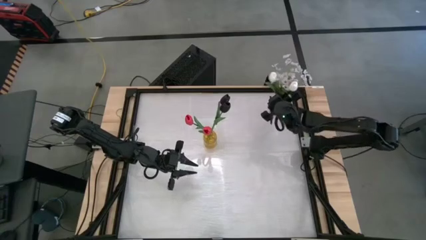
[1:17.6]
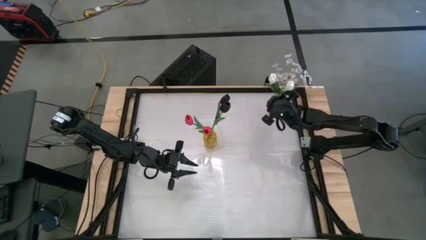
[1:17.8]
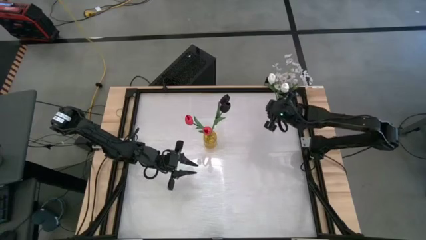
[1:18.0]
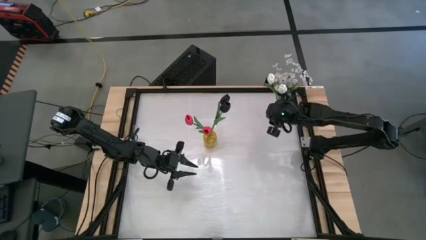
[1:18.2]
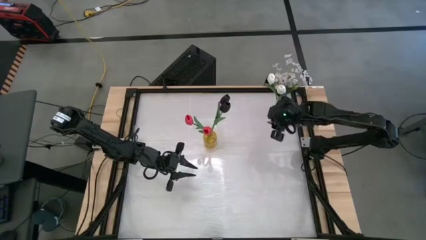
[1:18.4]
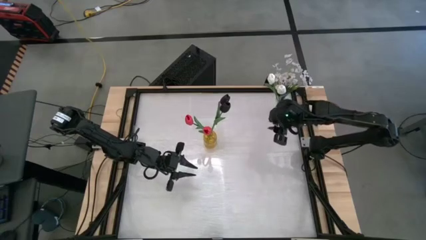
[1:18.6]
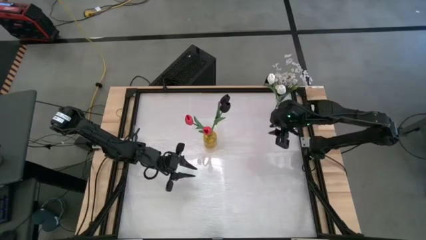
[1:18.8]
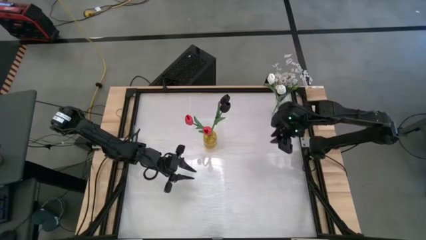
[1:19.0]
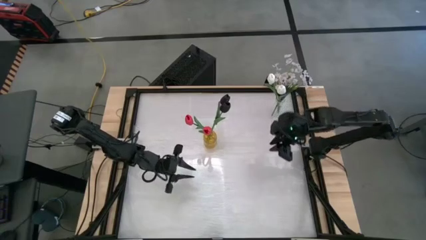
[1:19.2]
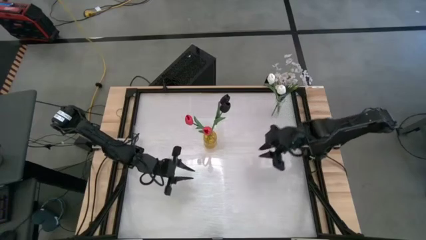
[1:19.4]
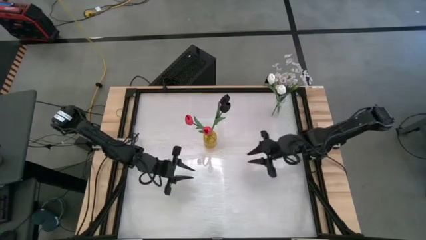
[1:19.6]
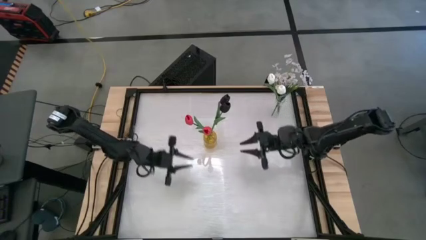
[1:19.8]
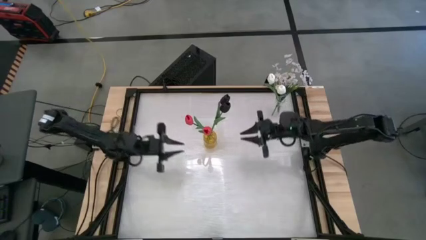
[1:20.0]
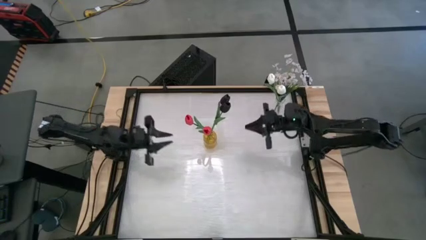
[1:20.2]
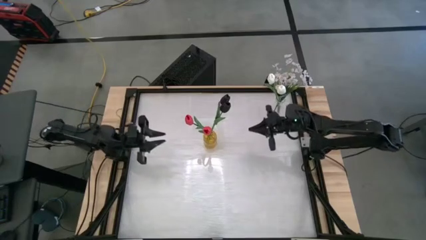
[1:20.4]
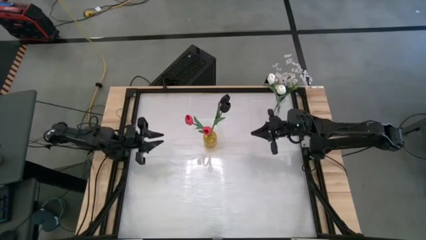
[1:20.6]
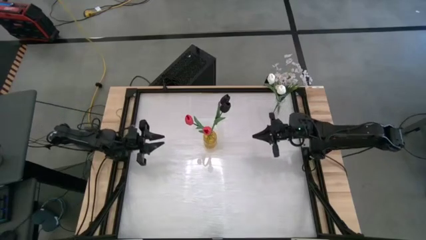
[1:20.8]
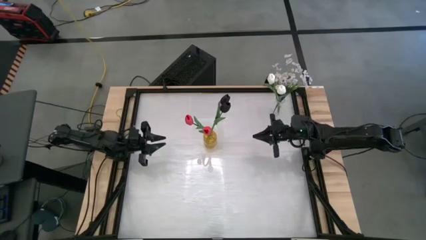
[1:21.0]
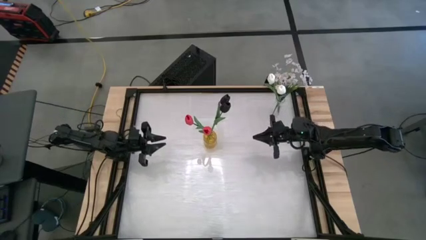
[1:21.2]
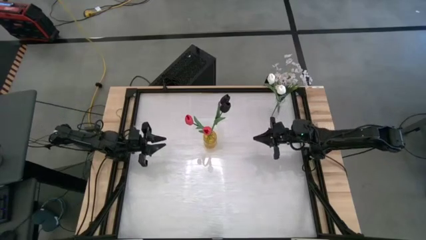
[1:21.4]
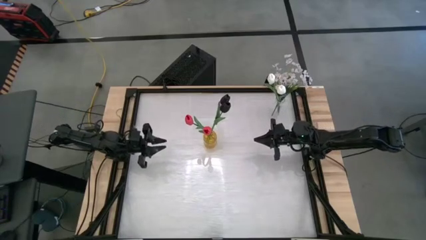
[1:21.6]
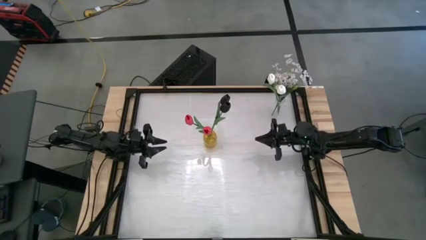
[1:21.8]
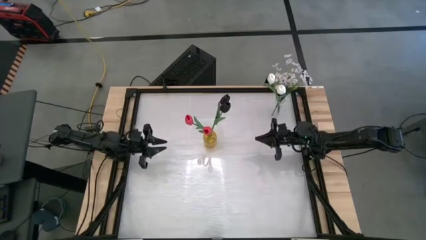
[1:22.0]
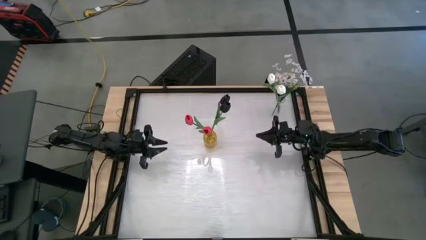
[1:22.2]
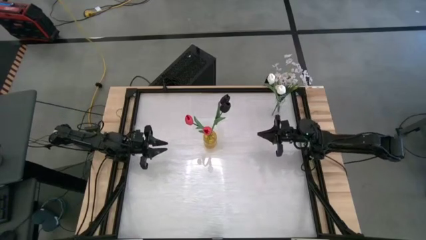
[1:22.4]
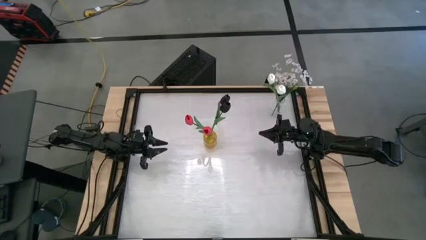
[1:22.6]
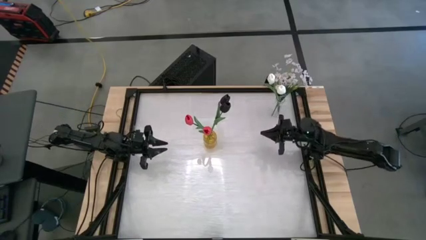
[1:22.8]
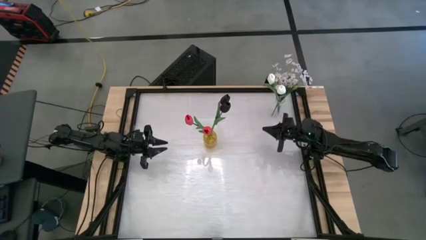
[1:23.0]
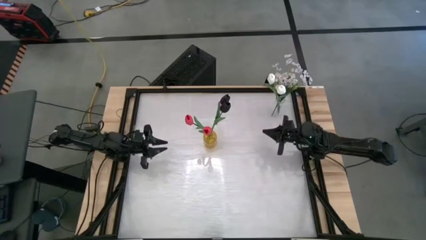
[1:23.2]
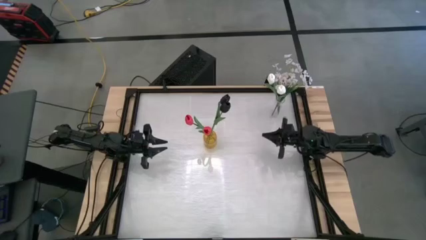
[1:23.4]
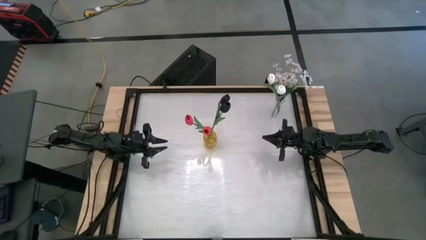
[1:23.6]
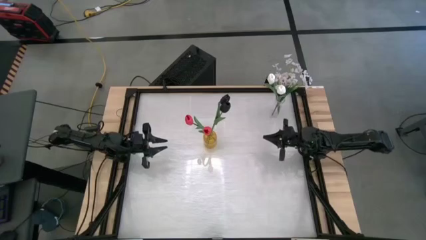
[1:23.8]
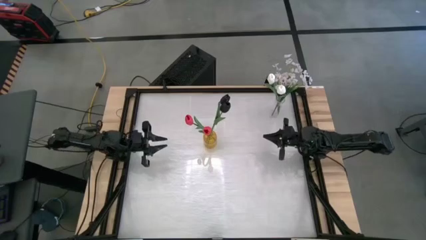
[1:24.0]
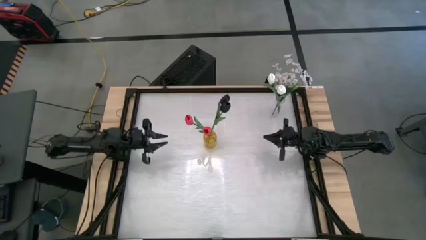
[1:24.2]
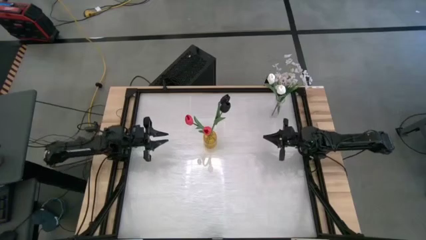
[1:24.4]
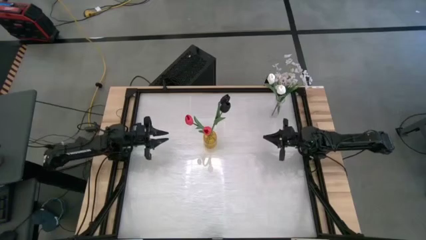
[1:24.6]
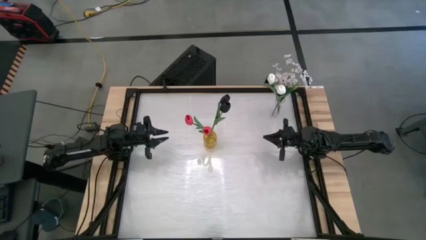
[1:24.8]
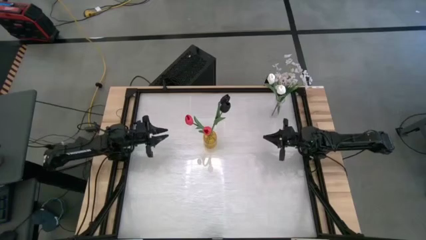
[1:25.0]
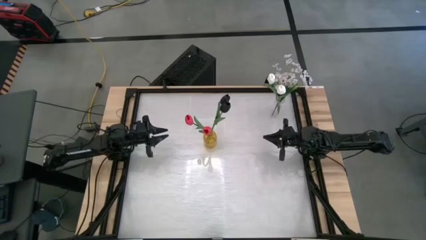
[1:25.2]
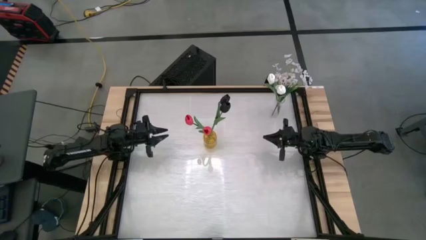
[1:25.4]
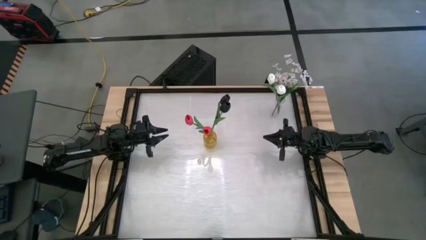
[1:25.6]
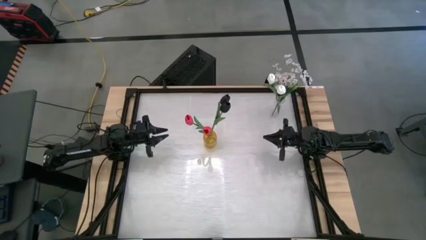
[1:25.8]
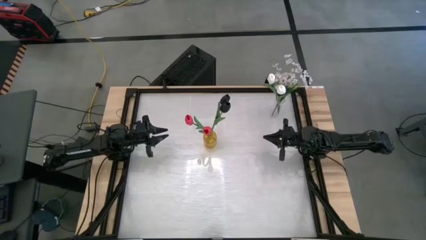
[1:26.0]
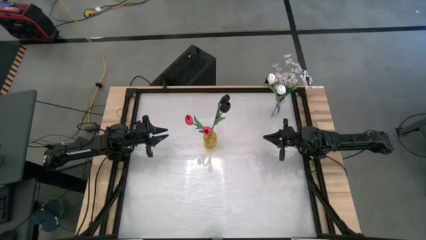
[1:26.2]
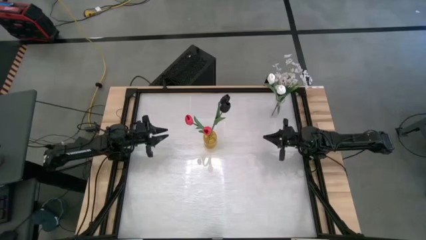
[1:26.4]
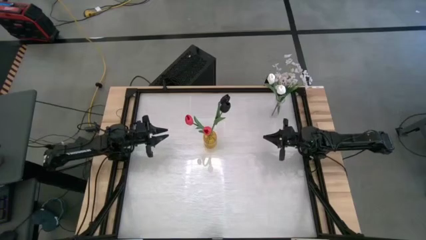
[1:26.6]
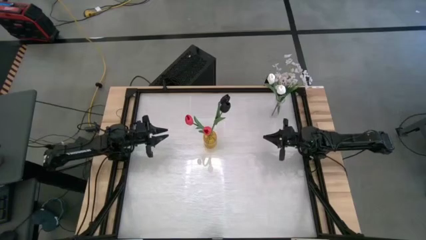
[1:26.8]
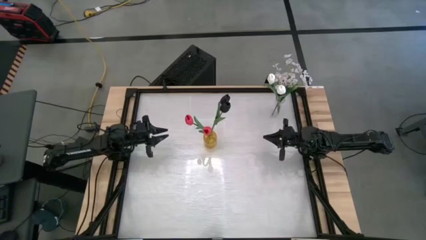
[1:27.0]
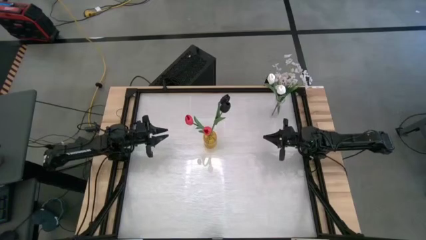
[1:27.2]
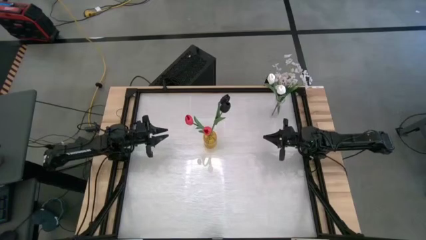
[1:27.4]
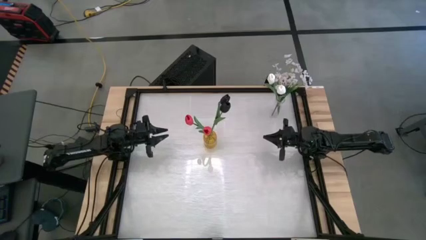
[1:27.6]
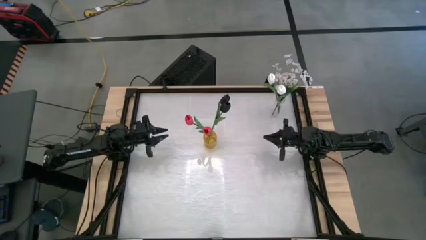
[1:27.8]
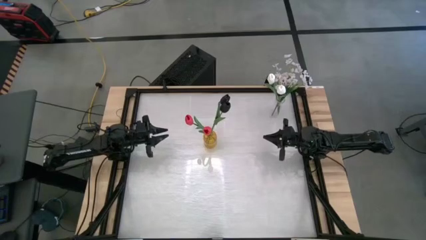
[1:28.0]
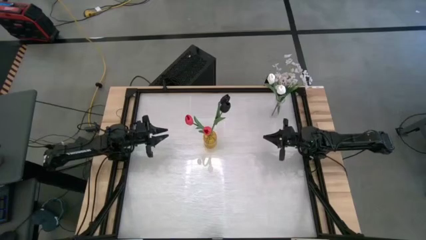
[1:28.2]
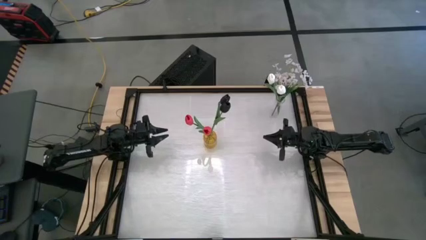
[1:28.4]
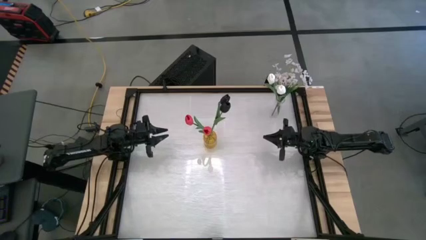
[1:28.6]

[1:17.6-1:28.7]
Task: Sort flowers into vase by color
Return to Home Position

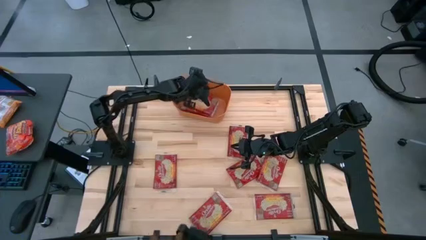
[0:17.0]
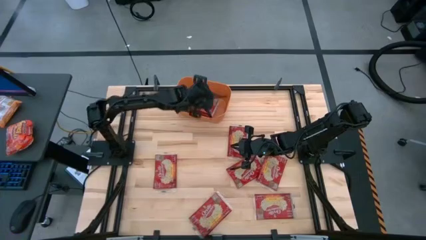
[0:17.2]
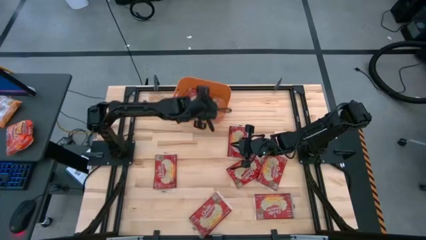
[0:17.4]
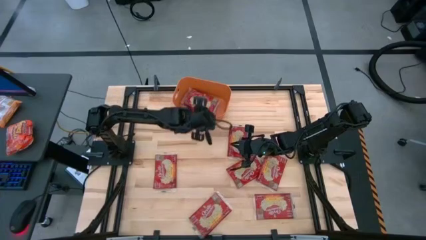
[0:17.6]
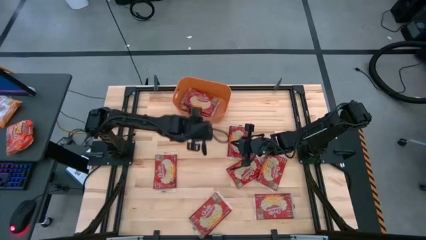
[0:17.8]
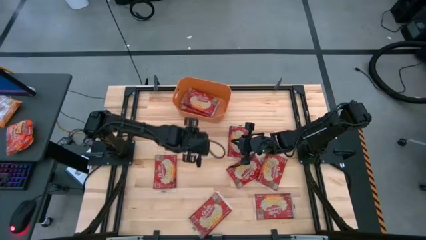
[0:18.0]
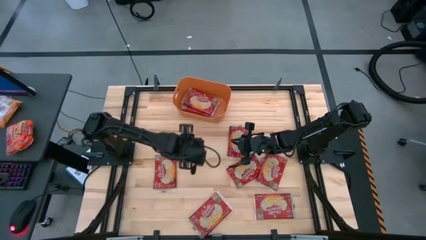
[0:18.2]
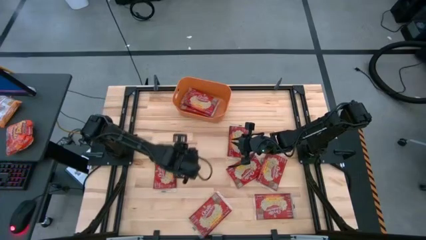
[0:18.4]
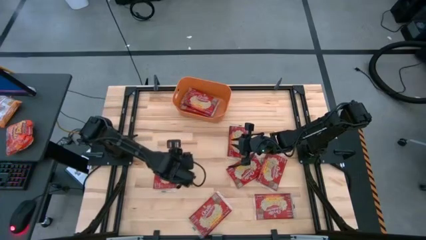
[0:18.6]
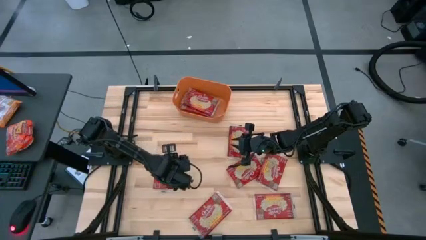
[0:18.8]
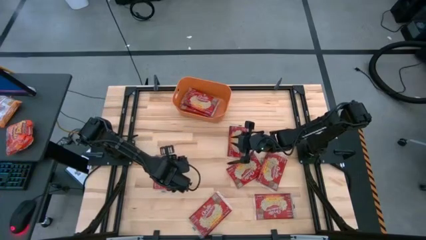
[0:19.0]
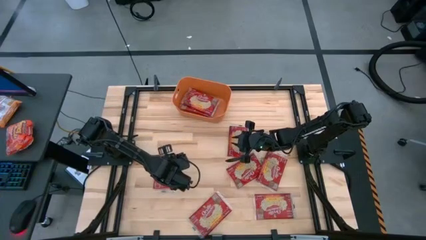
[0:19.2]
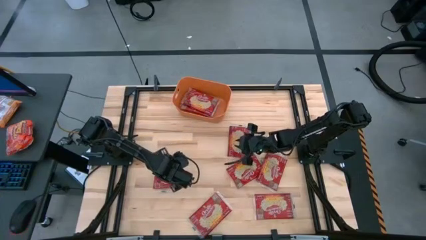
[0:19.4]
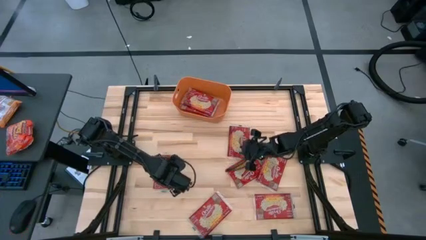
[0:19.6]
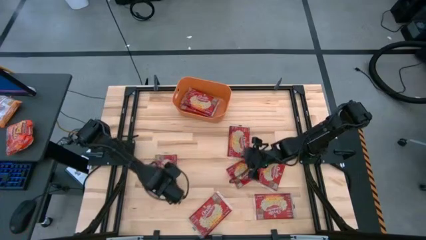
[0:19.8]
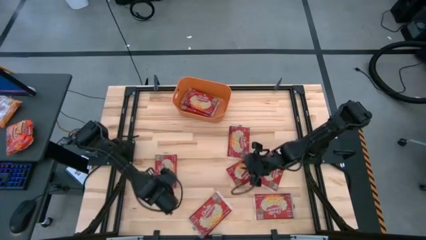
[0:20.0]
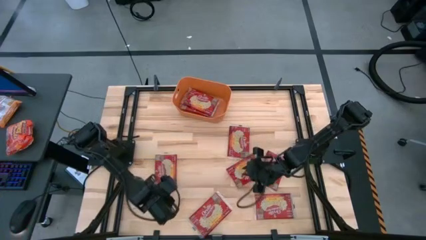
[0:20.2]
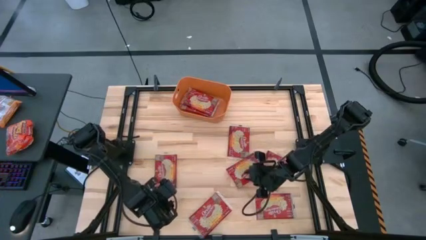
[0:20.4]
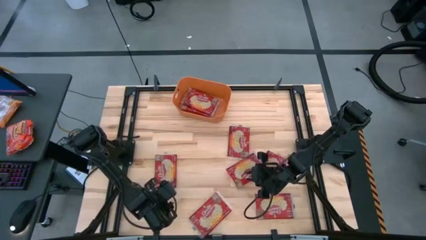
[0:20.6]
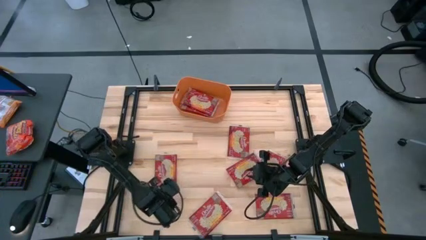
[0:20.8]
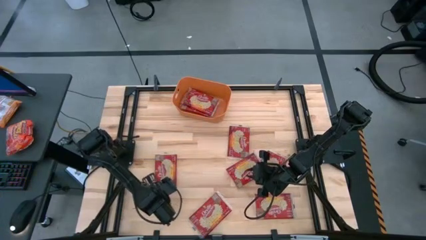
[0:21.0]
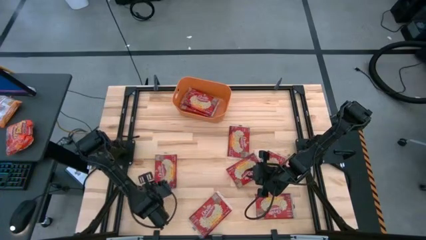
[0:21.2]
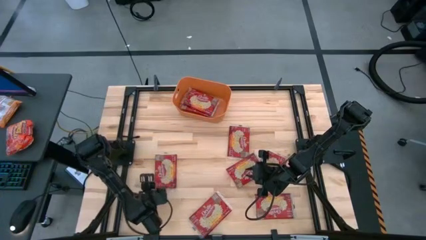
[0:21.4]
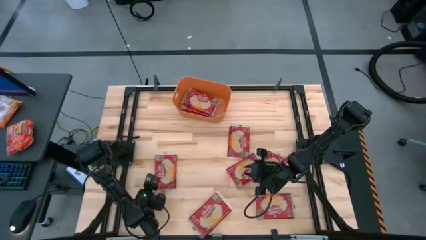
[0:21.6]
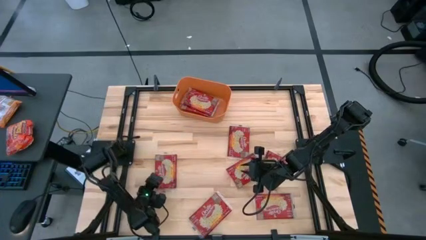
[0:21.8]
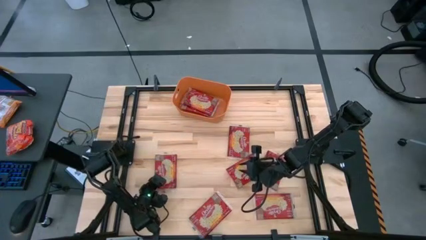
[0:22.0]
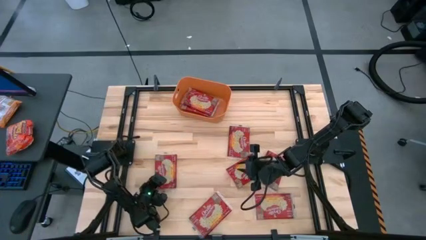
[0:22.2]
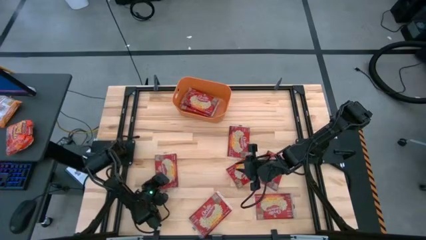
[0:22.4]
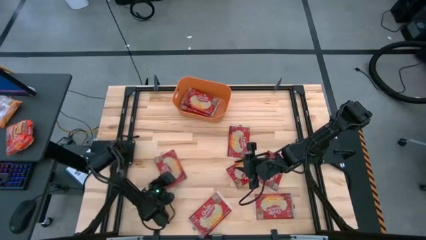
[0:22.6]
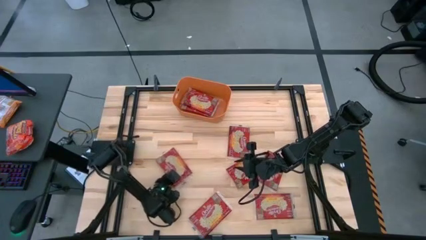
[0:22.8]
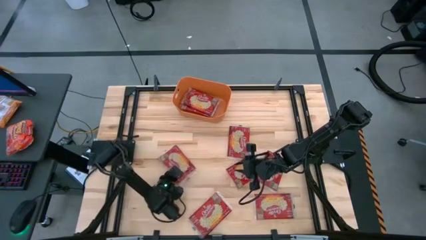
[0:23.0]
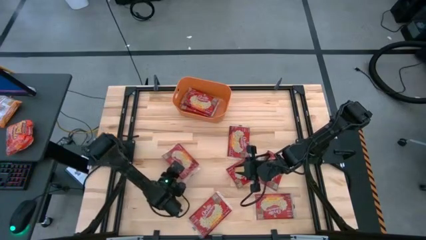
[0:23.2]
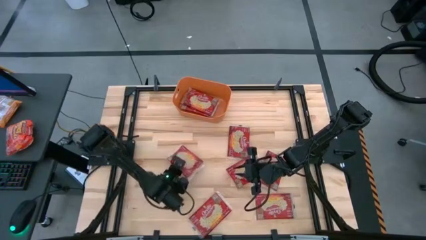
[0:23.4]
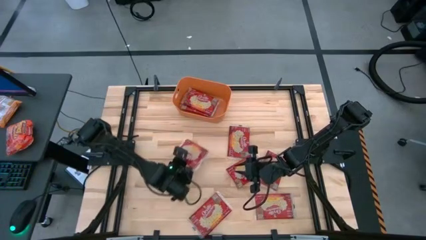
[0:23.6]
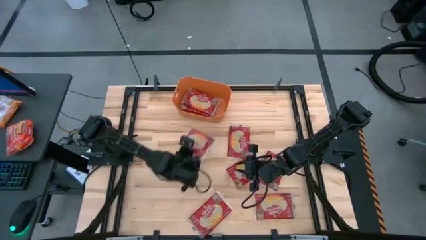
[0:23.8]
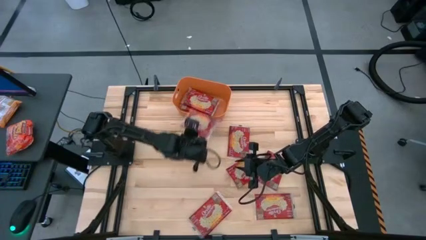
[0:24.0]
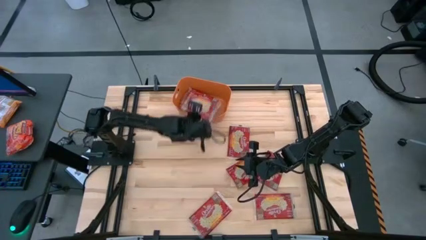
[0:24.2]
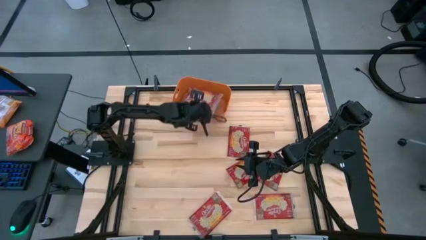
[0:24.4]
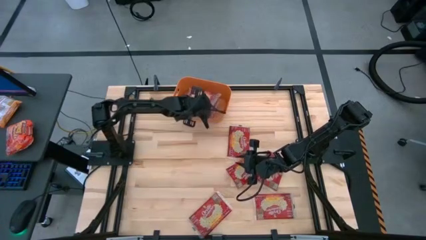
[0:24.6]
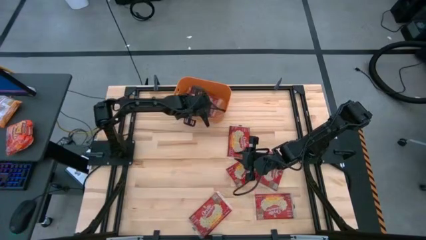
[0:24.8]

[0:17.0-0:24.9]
Task: Sort popcorn bags into baskets
Put the red popcorn bag into the orange bin
